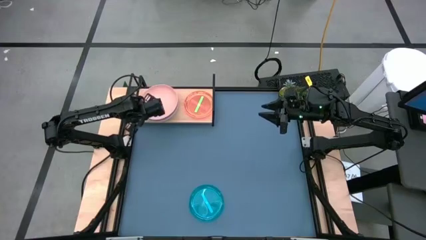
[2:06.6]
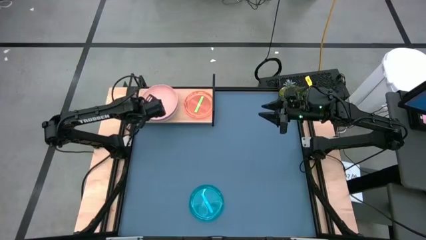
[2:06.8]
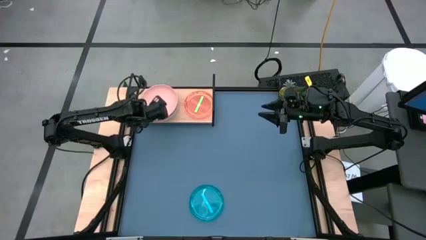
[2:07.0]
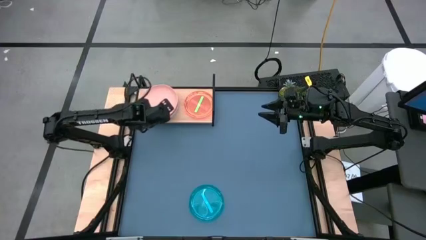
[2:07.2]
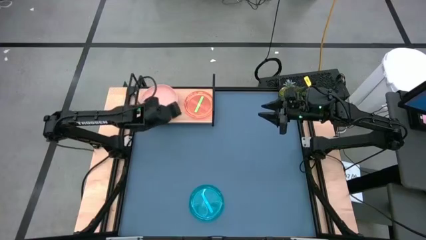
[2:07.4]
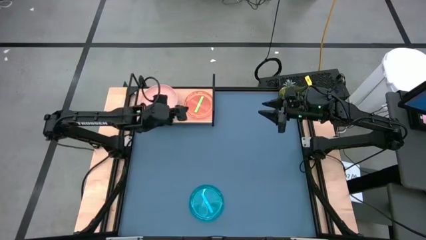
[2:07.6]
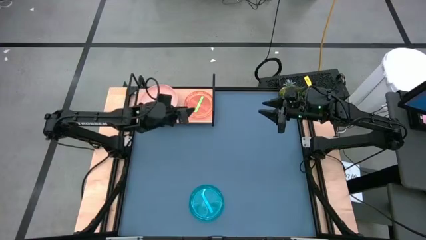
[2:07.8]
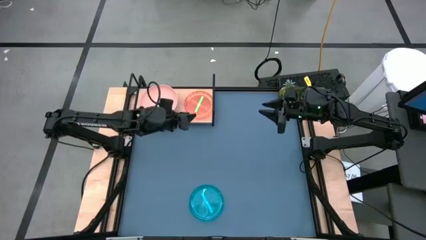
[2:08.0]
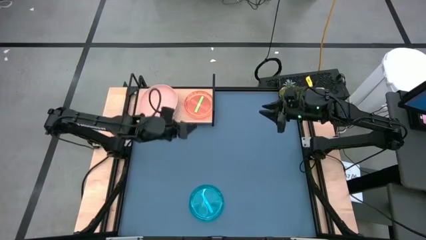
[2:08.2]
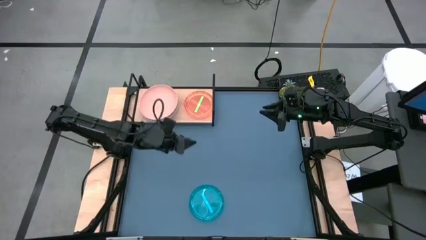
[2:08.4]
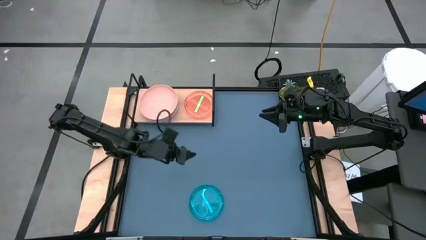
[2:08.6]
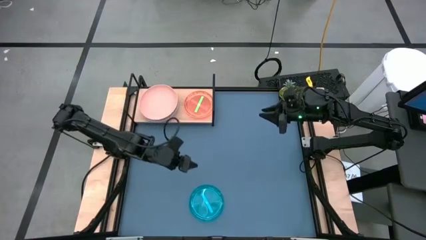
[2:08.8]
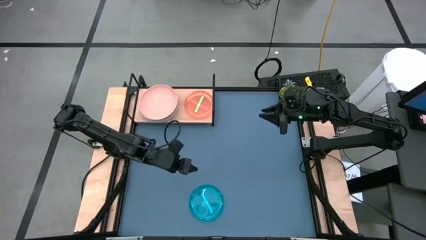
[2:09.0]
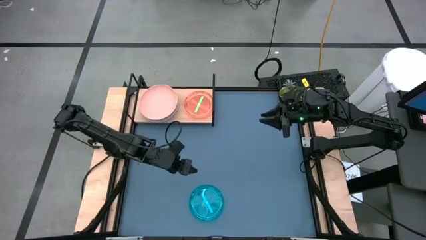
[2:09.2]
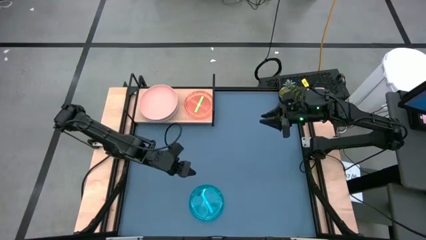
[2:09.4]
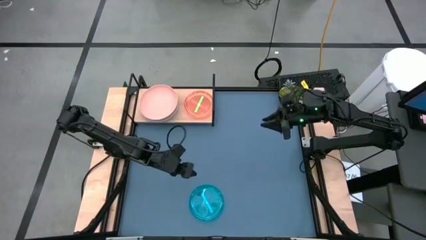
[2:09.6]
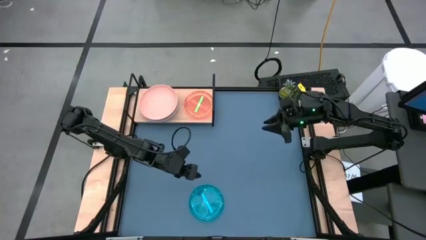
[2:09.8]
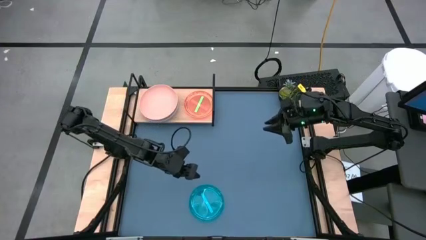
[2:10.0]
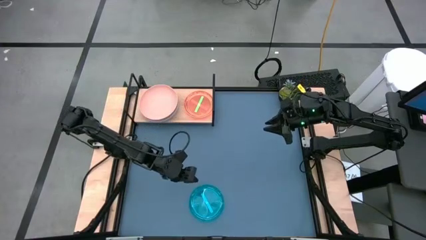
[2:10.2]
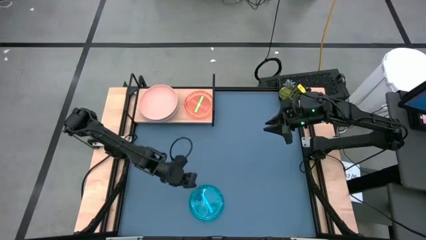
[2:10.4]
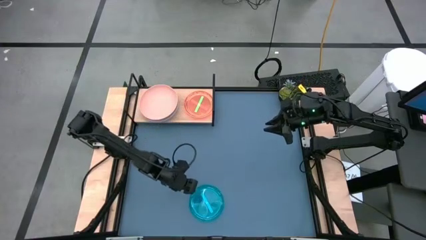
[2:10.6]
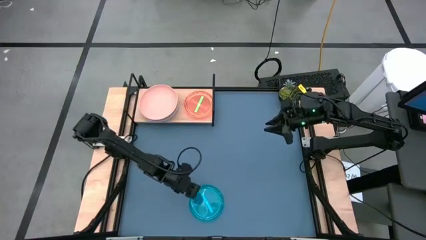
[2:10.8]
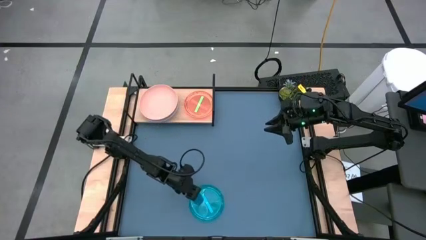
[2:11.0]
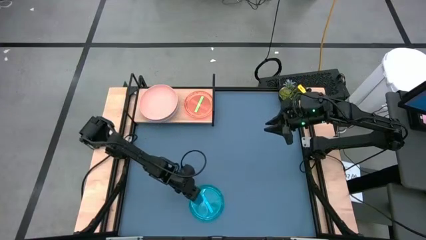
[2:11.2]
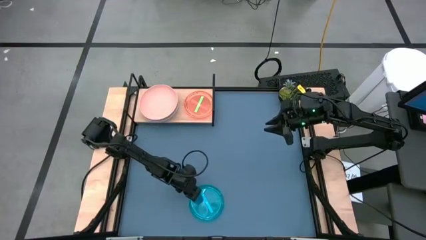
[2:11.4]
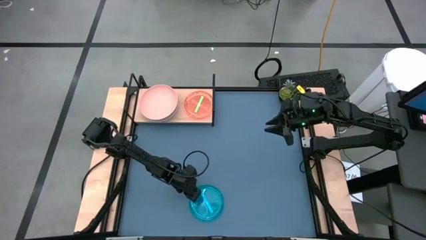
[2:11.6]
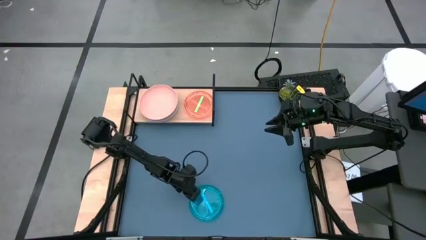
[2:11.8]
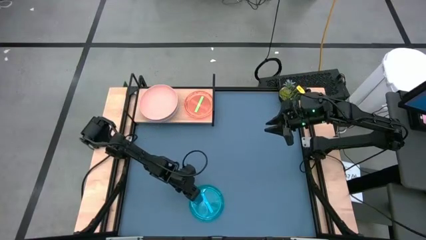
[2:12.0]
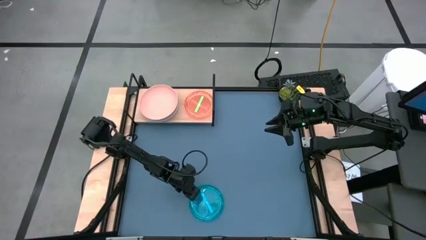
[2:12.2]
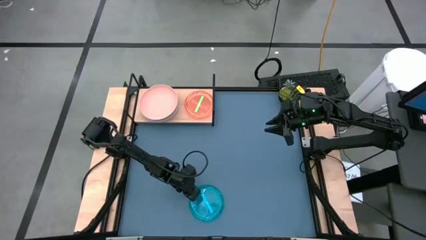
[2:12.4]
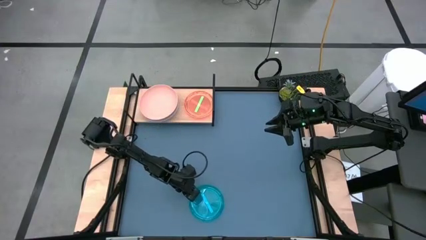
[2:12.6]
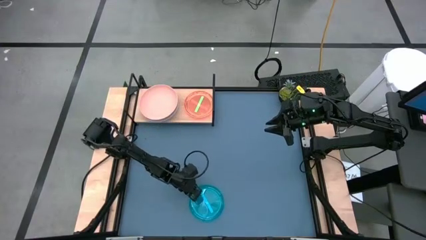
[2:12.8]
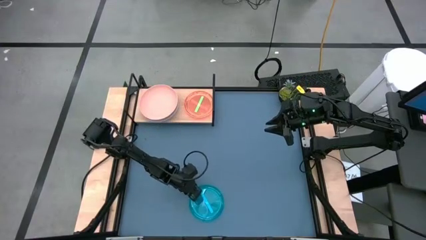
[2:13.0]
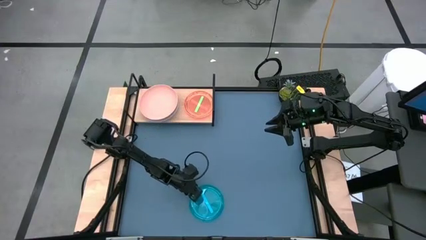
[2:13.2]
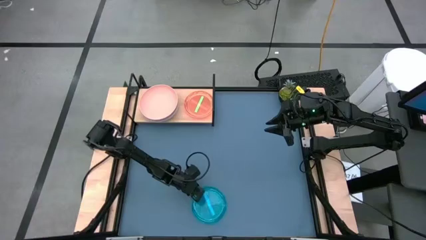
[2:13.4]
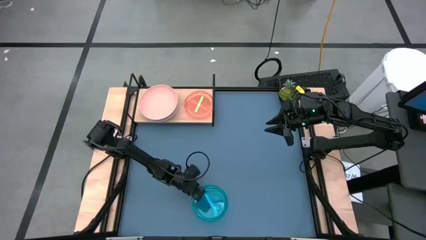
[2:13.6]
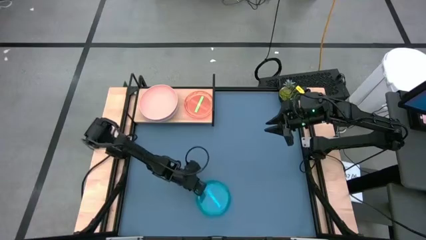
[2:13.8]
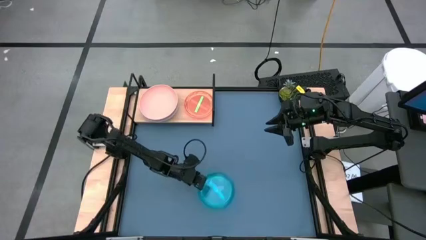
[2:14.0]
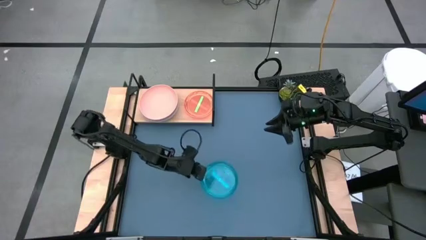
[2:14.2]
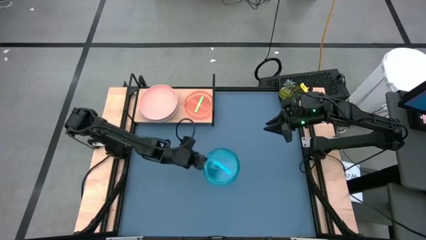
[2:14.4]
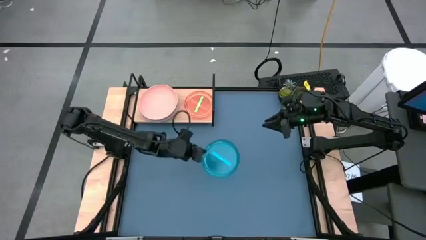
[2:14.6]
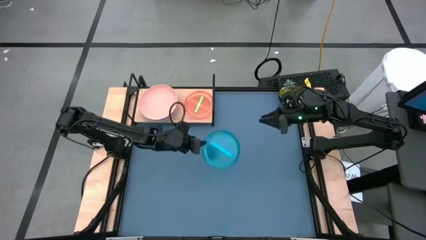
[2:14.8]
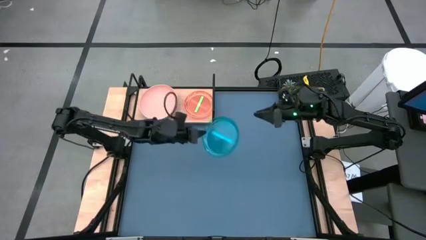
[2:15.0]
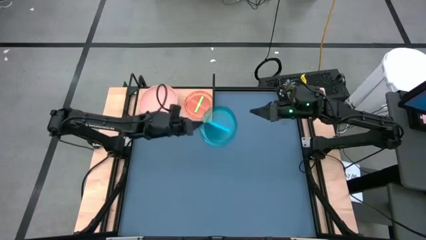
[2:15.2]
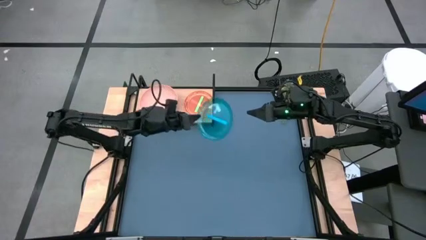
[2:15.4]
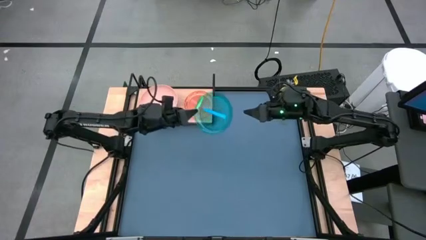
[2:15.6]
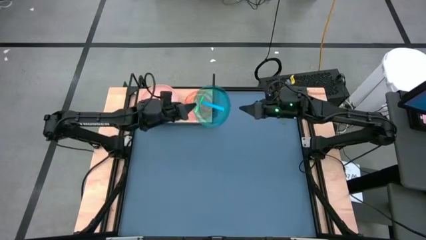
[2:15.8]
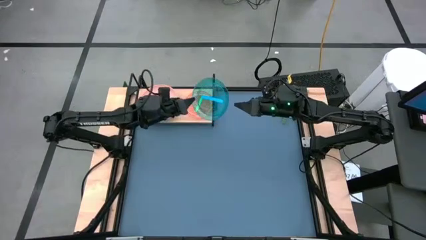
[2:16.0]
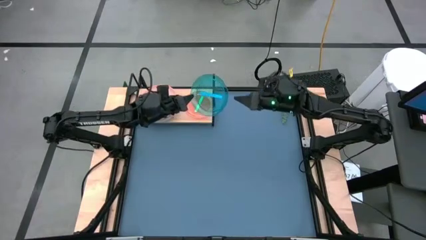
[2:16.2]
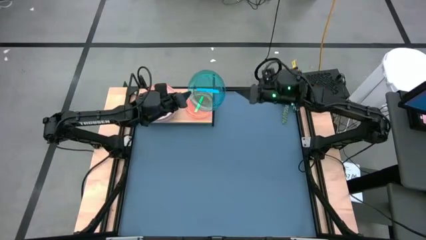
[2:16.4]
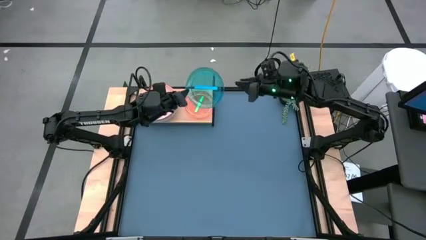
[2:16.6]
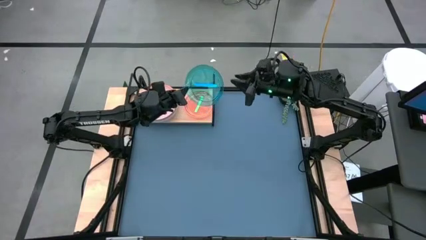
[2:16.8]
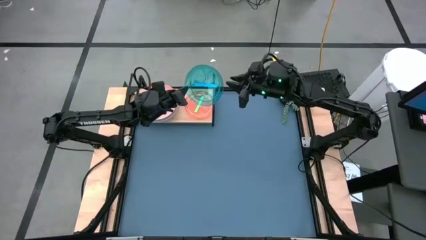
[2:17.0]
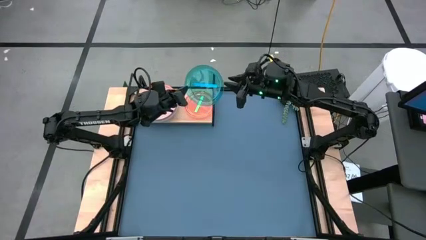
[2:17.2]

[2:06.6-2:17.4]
Task: Place and stack plates onto a shelf
Stack the blue plate on top of the green plate on the shelf

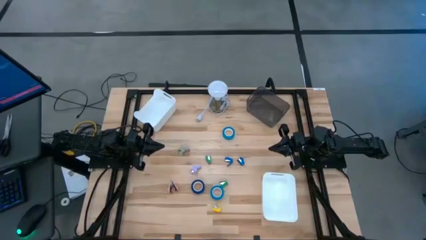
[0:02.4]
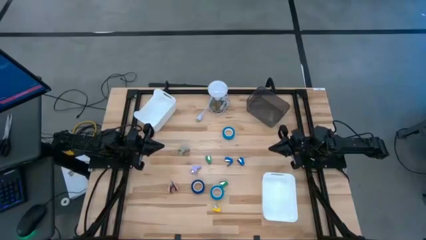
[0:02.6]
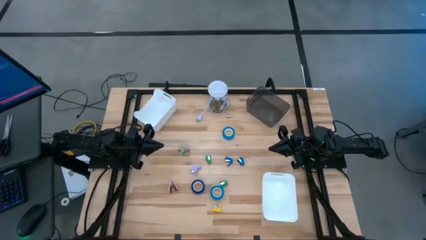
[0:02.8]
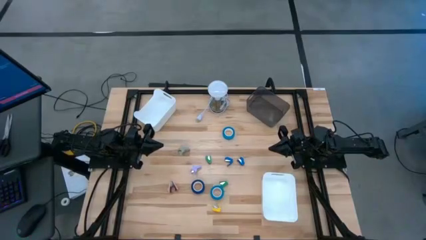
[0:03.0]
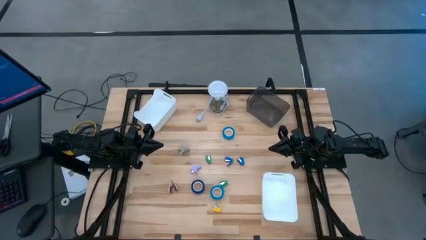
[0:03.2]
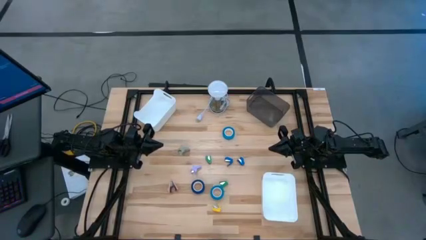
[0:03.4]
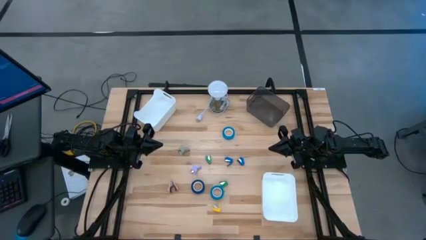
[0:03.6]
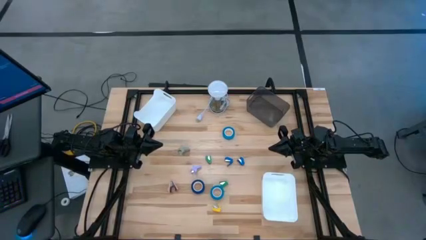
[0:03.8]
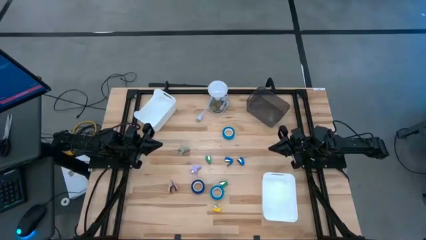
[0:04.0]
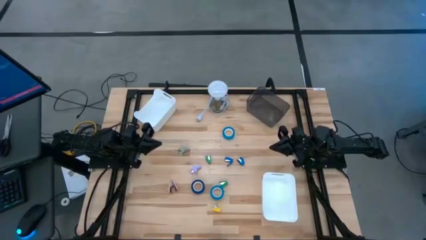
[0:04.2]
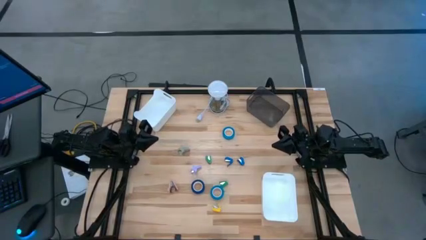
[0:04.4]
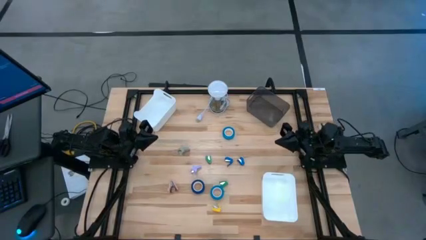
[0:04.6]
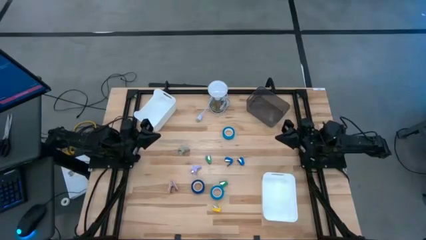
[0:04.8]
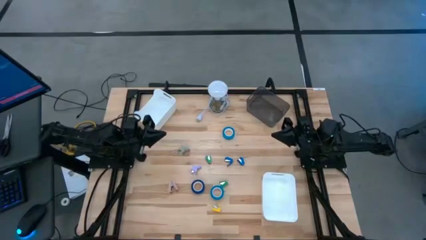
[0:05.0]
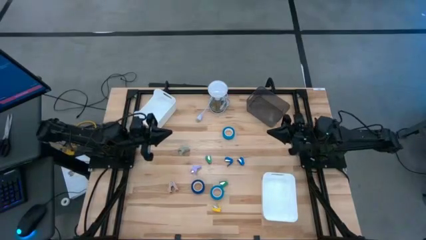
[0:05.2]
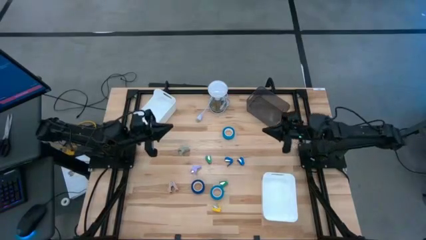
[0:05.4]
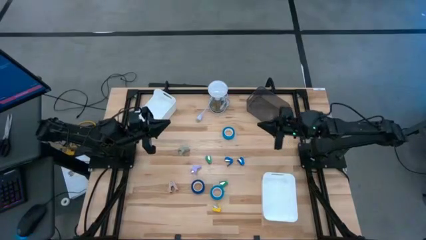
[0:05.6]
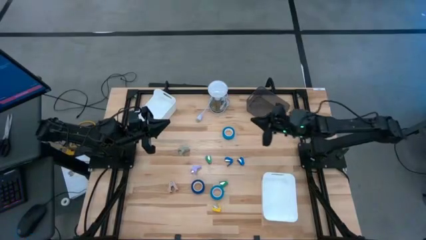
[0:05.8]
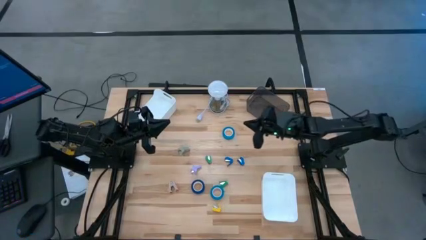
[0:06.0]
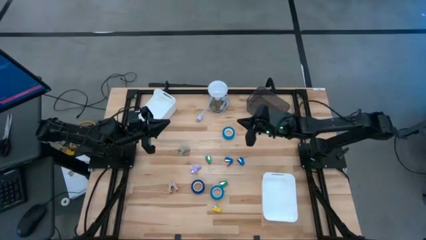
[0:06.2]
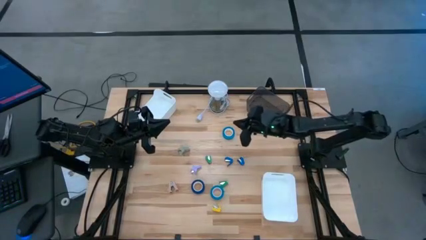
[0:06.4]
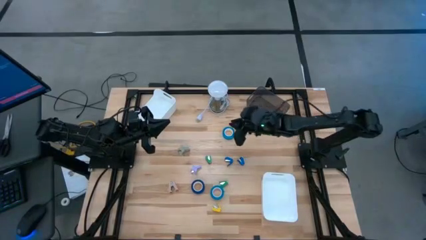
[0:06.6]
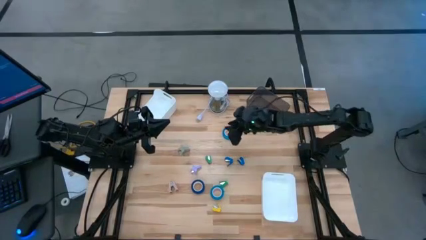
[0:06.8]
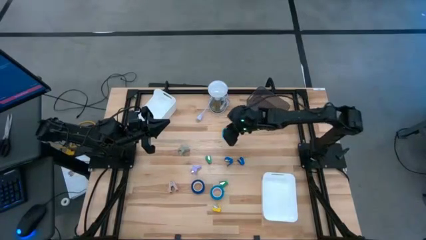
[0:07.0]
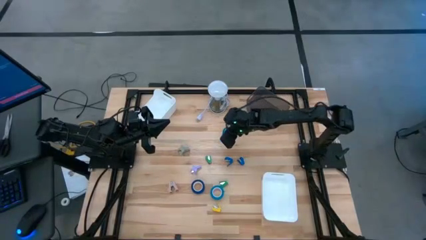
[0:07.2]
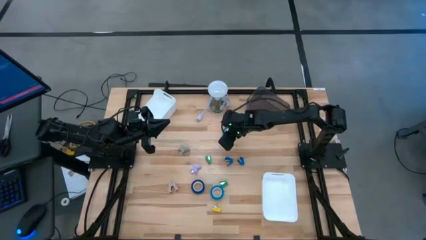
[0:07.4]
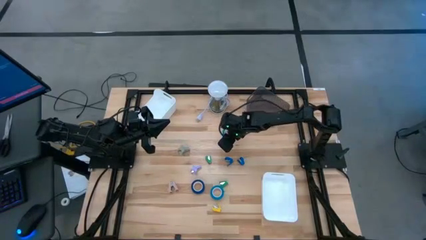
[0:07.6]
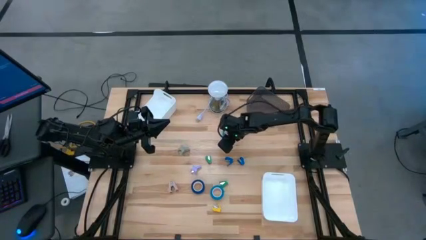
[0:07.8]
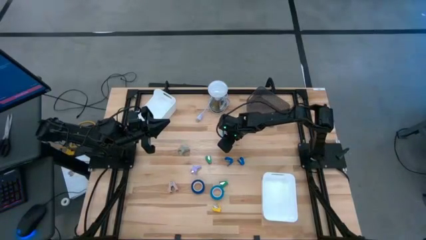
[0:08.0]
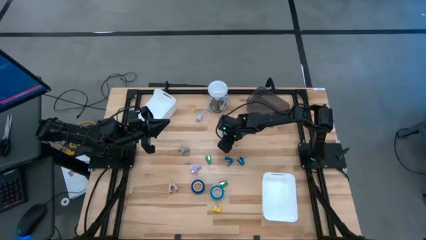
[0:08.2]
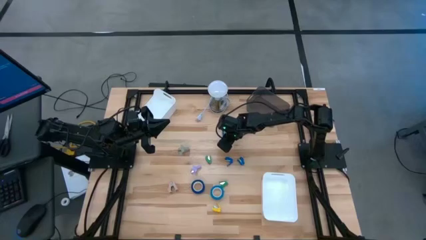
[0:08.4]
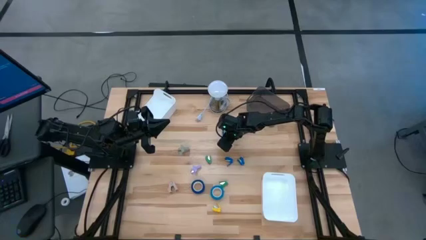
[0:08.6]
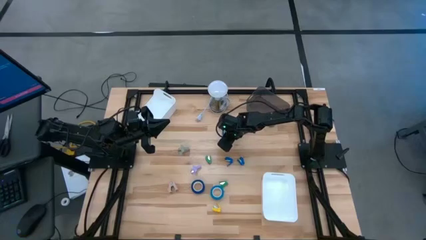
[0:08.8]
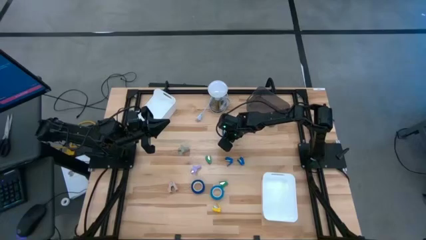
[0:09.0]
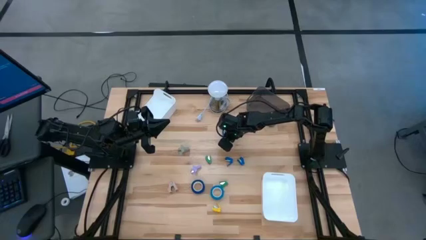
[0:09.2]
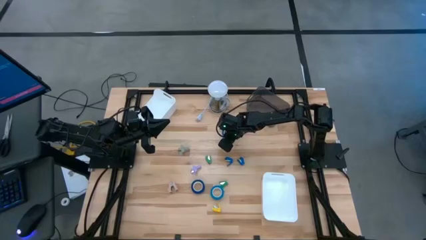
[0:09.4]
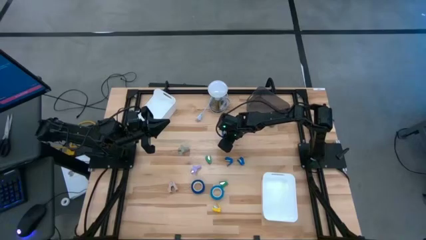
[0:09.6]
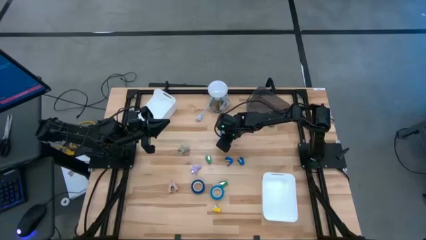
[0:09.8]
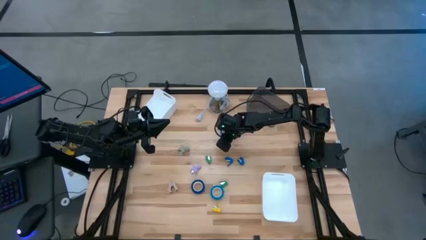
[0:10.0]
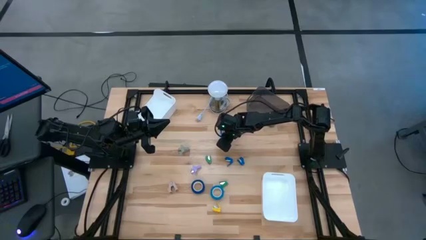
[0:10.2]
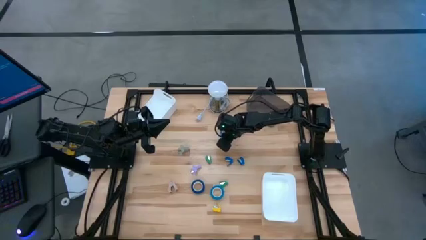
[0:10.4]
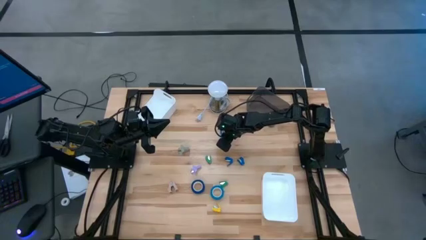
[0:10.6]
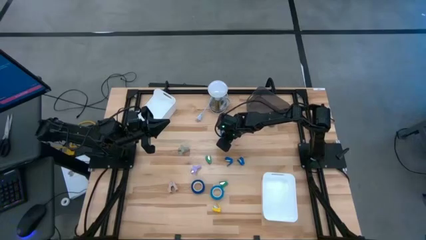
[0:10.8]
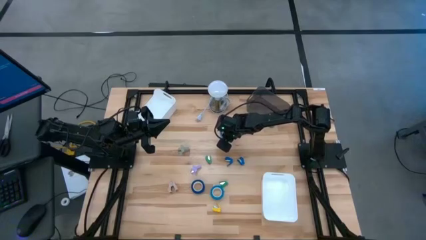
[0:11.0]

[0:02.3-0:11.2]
Task: Pick and place Stapler, Stapler remover, tape
Put the top light blue tape into the bottom white bin
